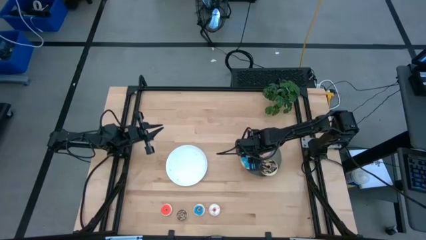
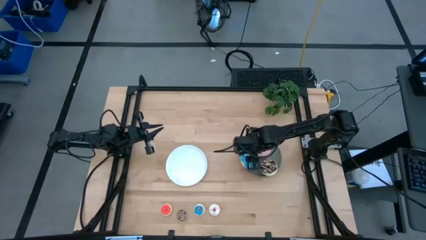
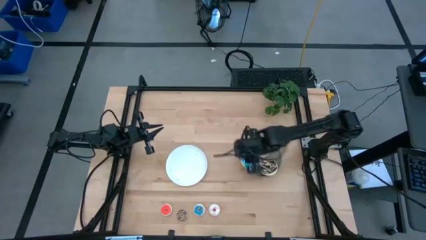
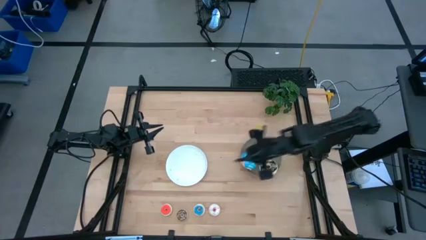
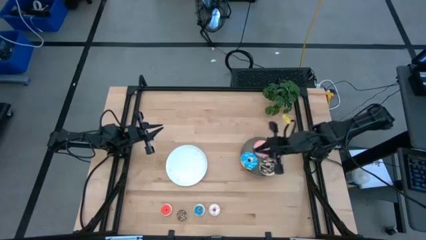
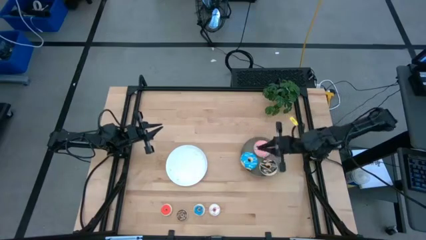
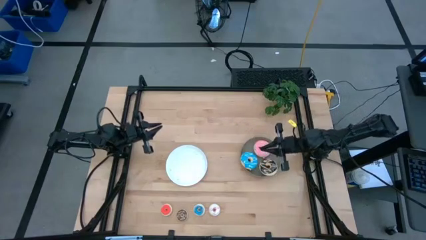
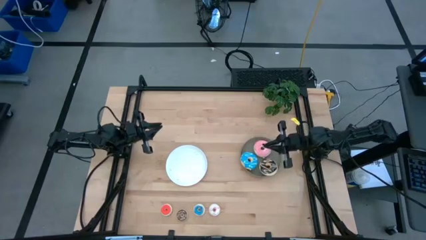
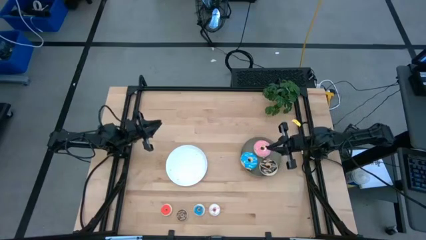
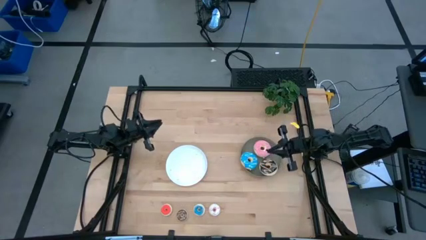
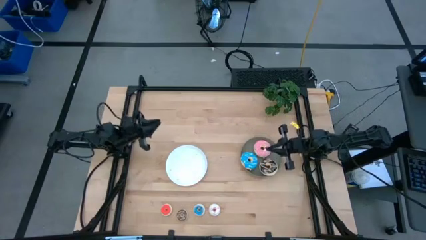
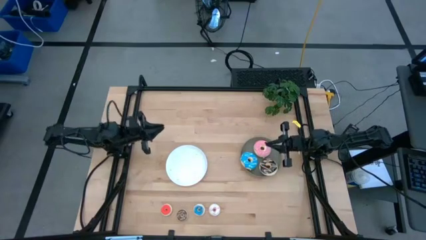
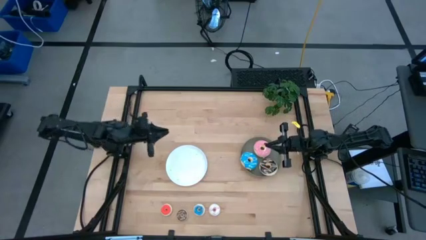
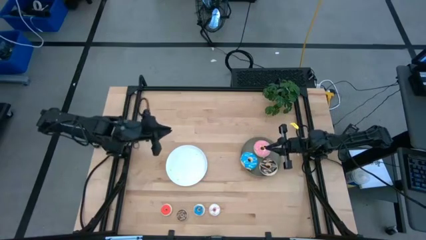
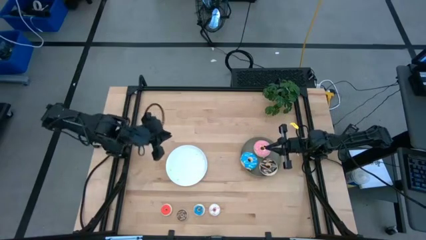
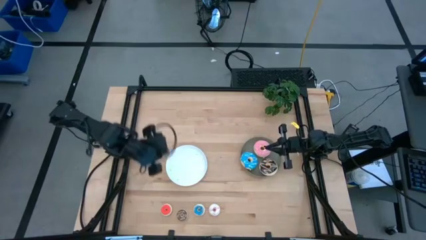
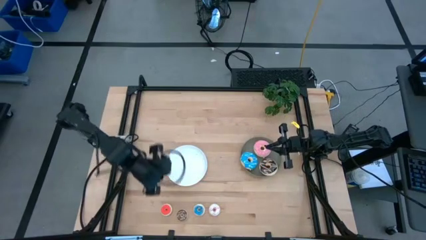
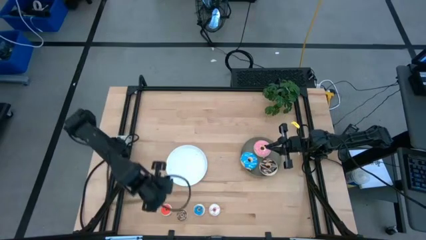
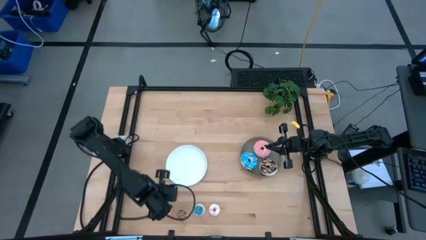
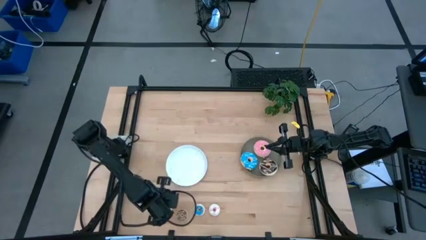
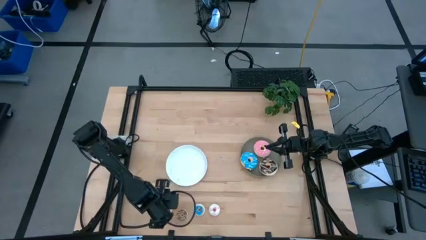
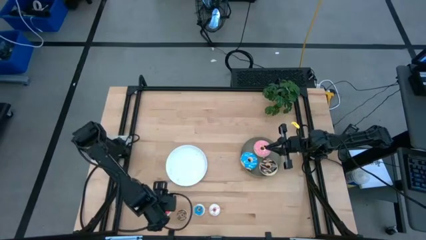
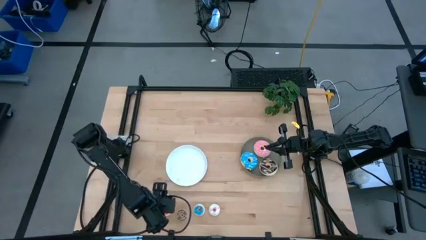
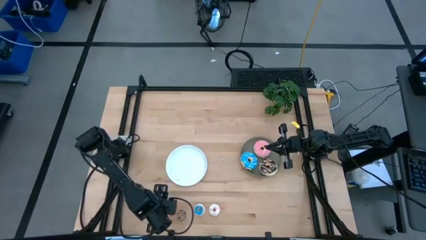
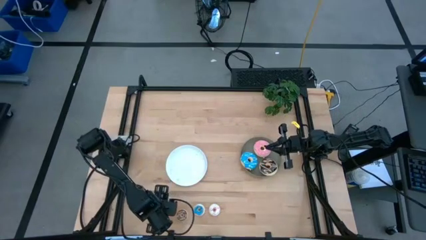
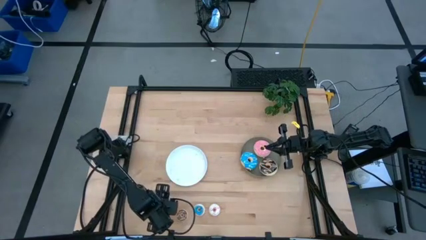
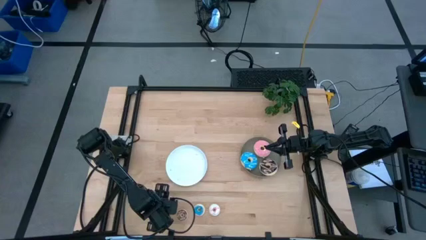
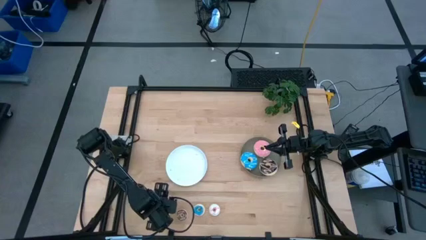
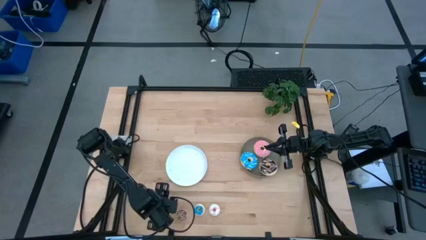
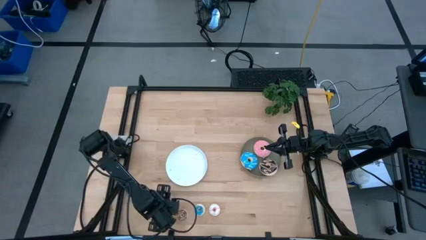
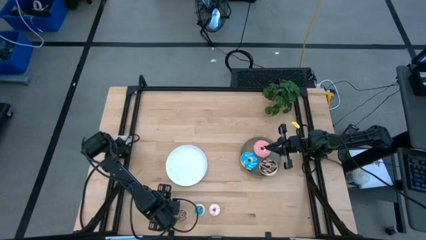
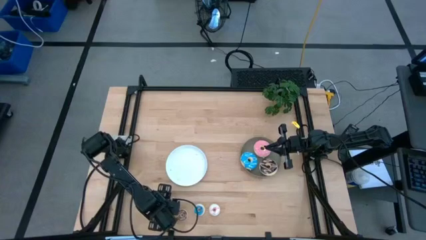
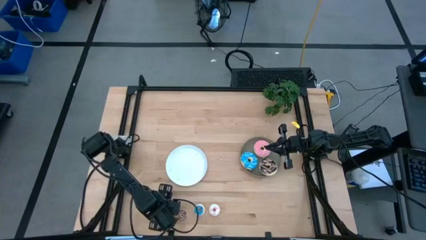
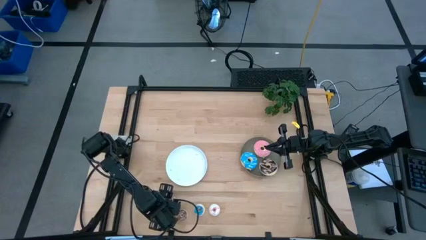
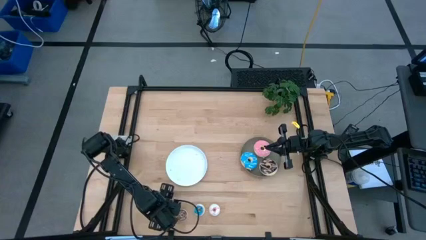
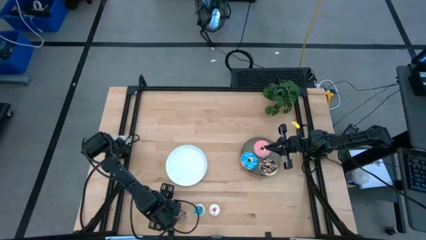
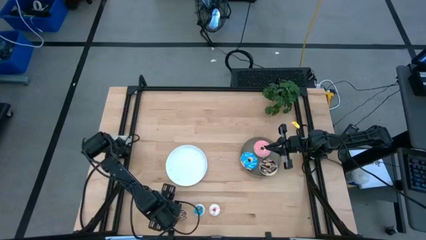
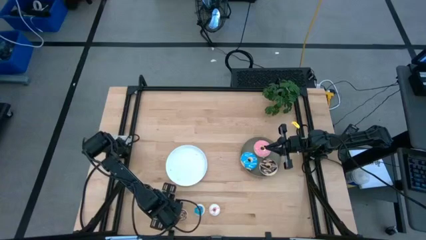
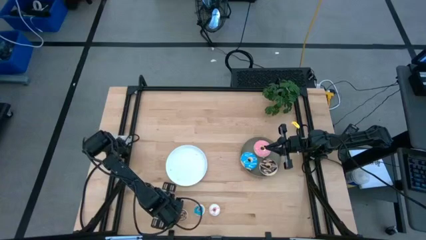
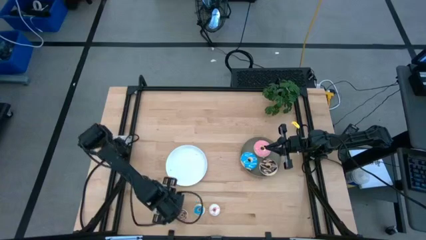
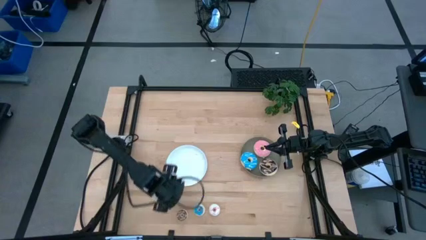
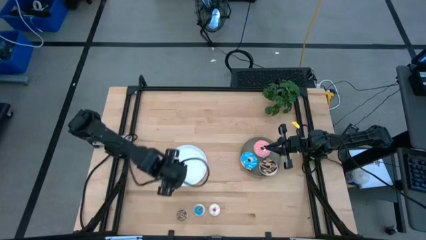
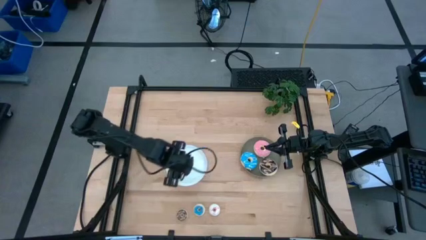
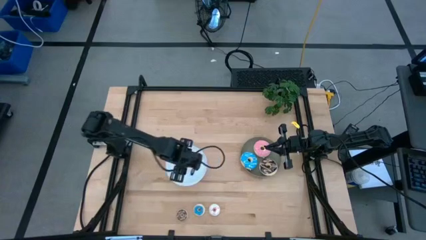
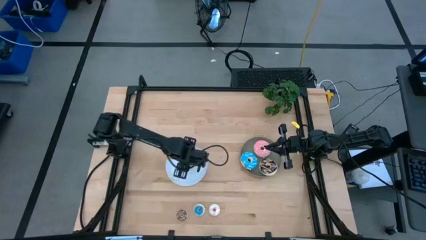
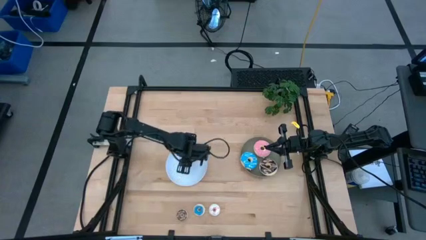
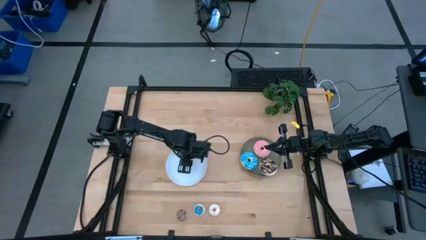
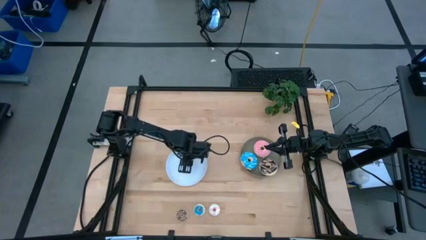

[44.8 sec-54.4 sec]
Task: Pick & Place donuts
Put the small orange donut on the white plate

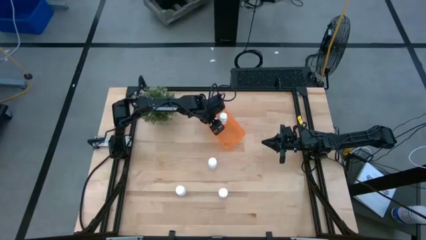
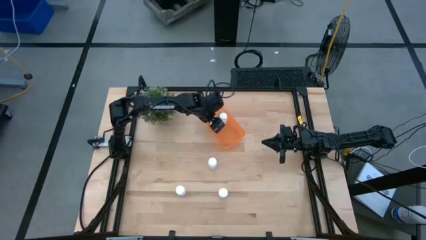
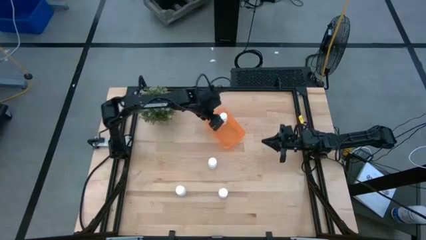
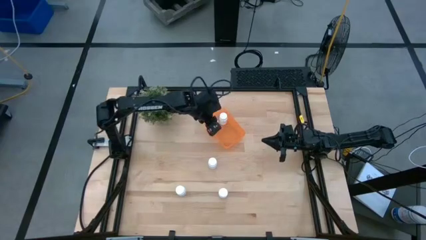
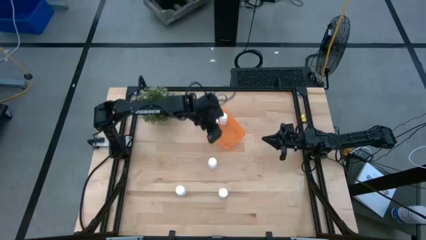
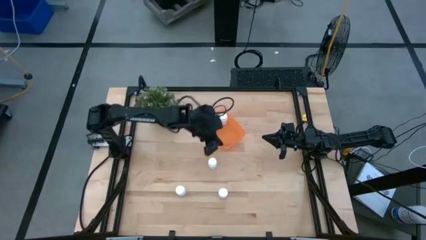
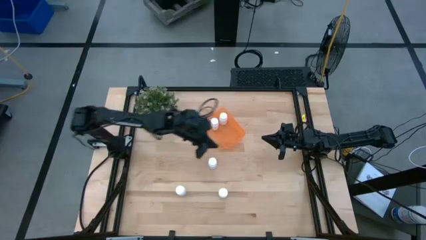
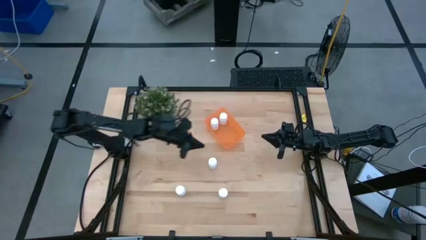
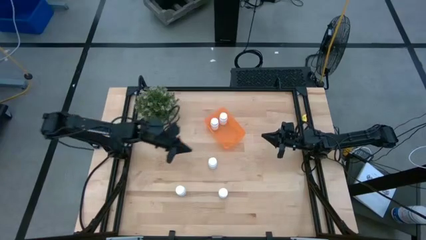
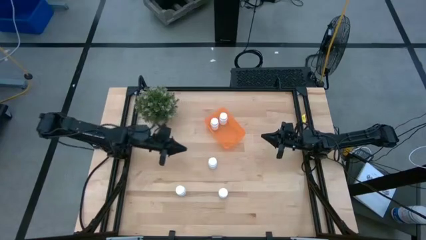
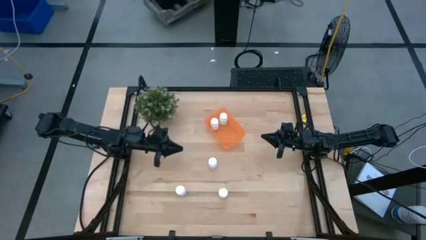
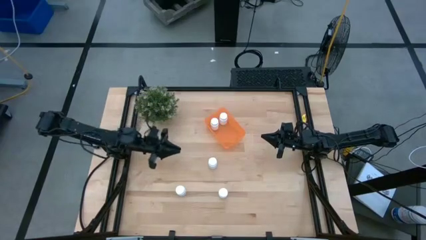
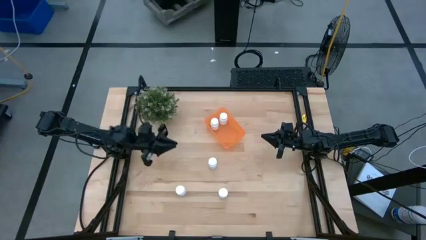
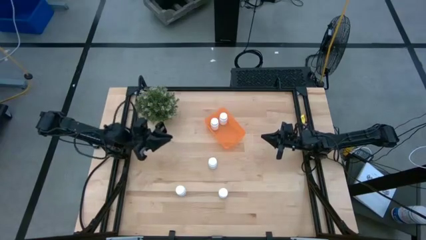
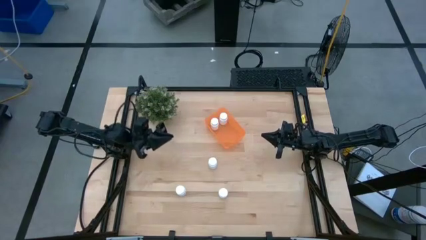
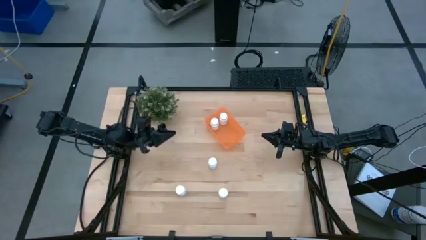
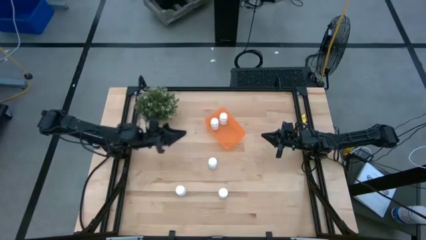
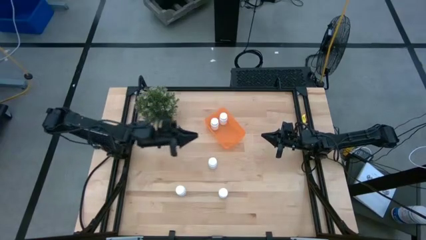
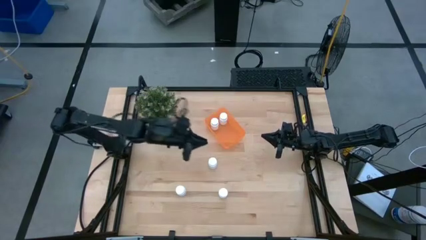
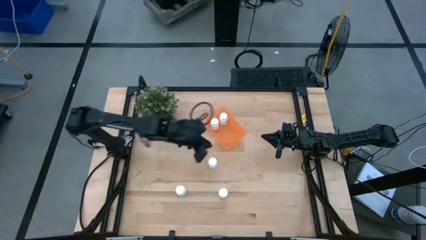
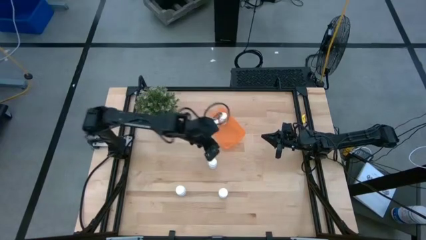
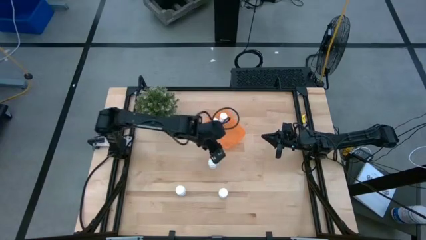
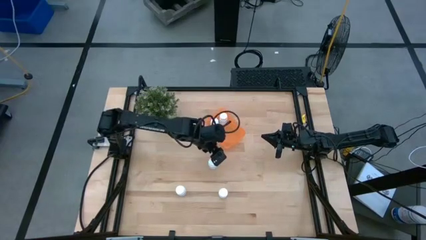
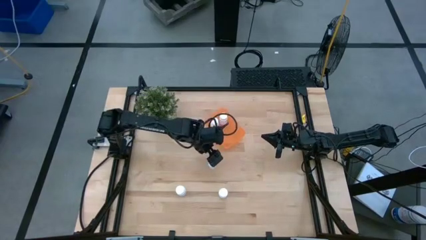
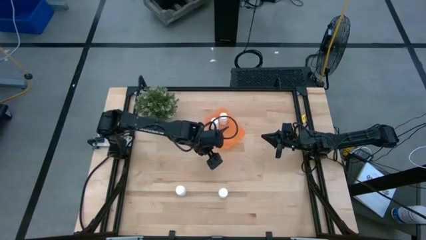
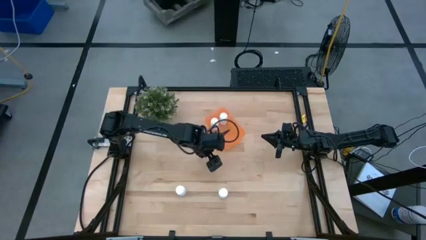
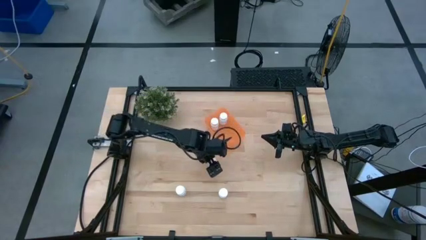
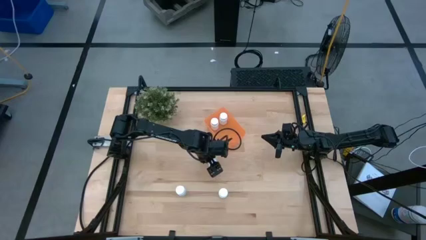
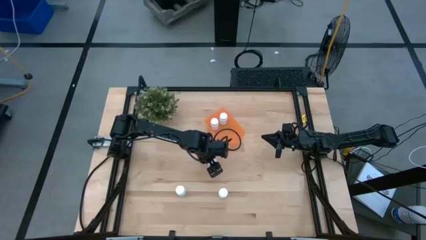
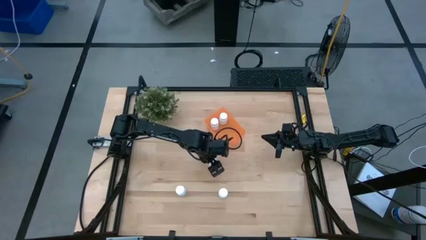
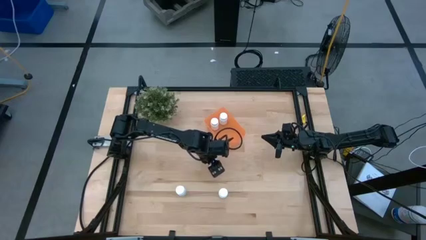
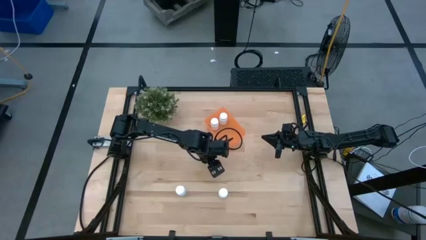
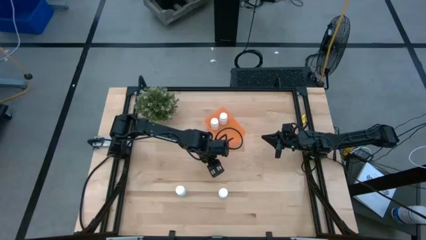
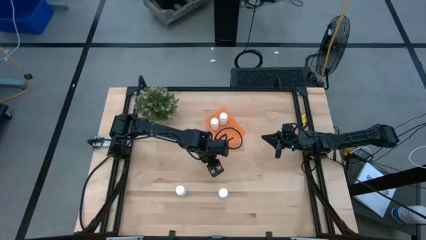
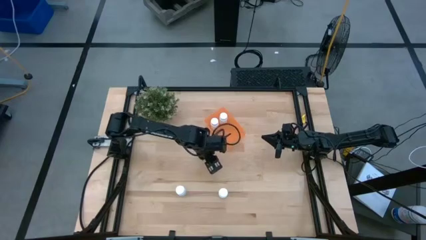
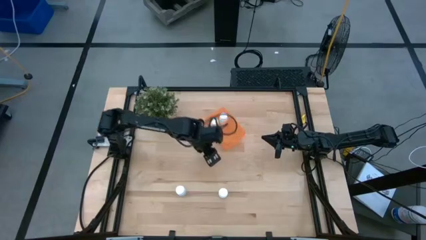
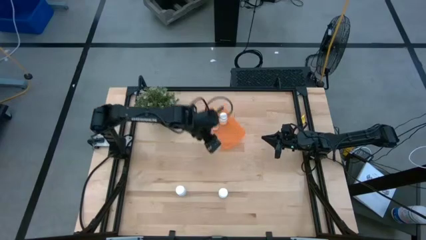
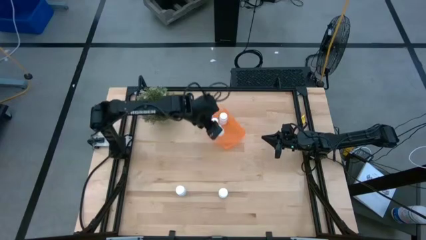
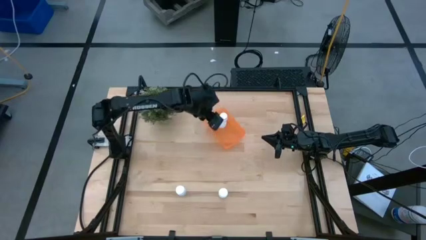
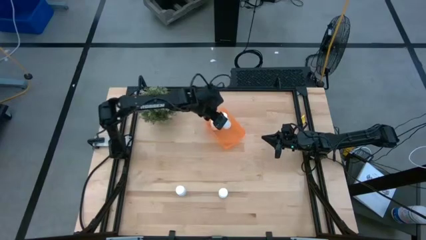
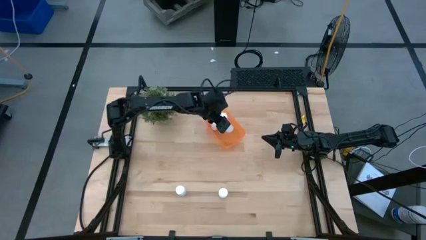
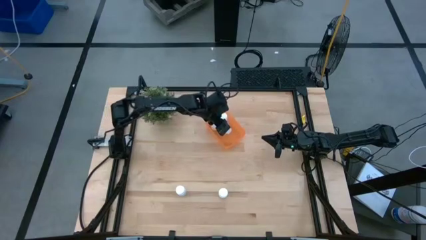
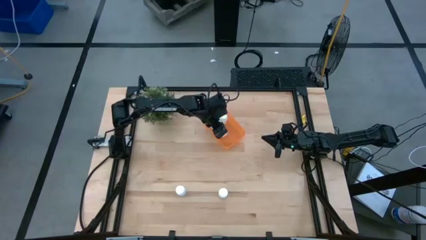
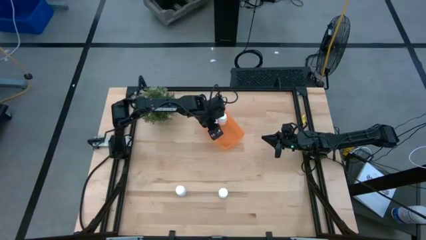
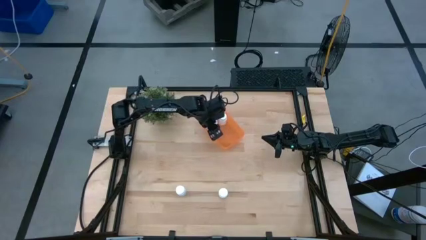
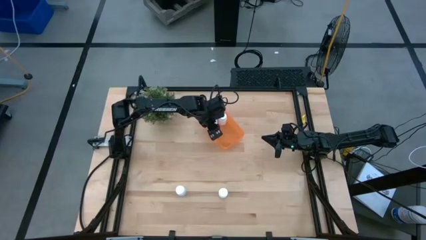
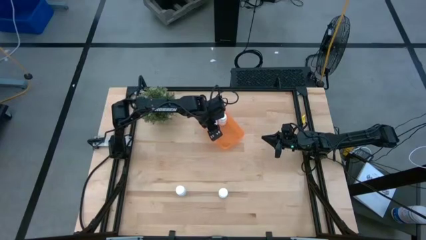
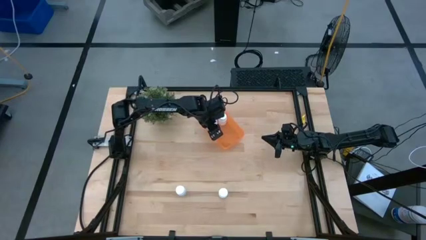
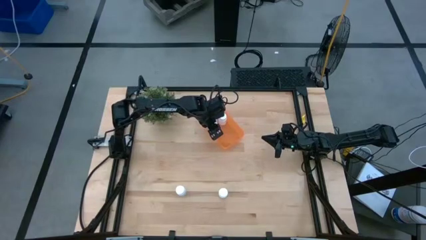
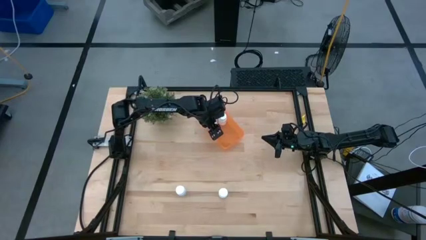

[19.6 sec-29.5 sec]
Task: Pick and place pill bottles into a basket
Put the white pill bottle into the orange bin
